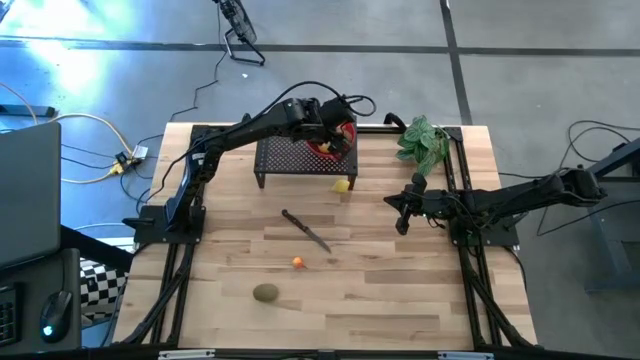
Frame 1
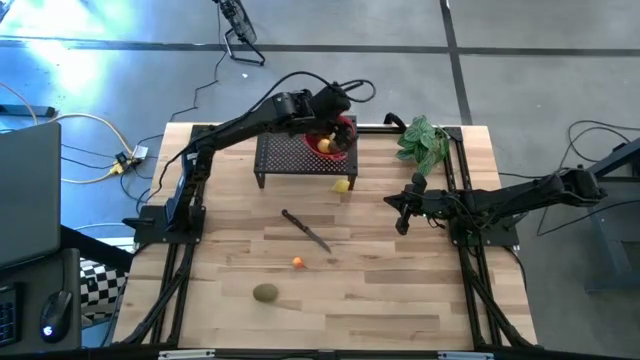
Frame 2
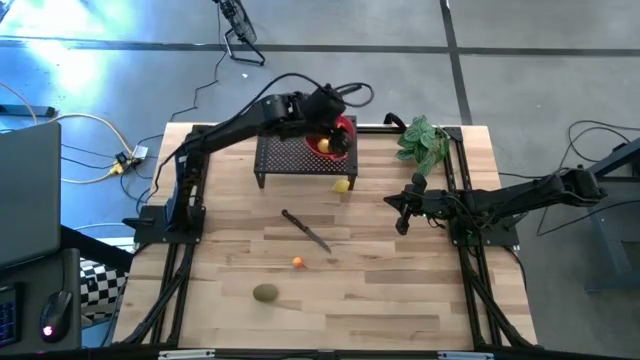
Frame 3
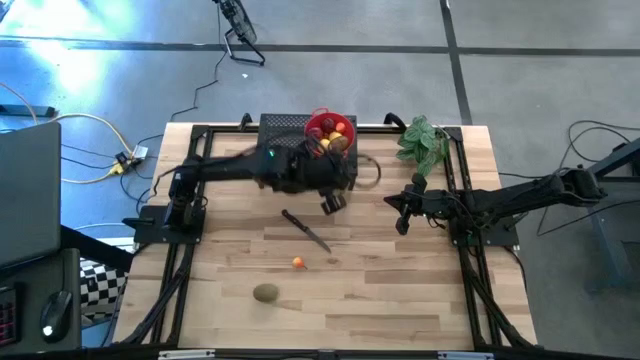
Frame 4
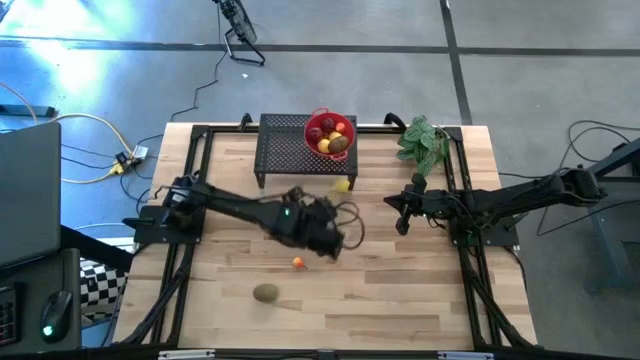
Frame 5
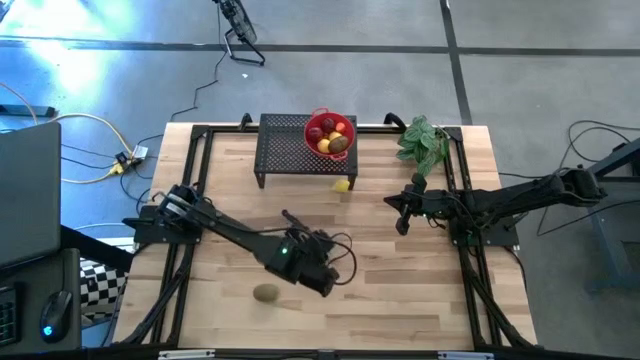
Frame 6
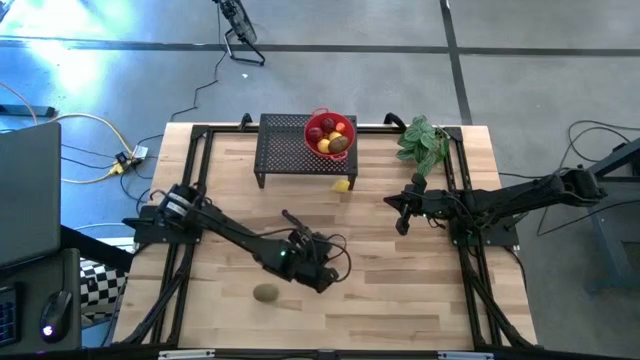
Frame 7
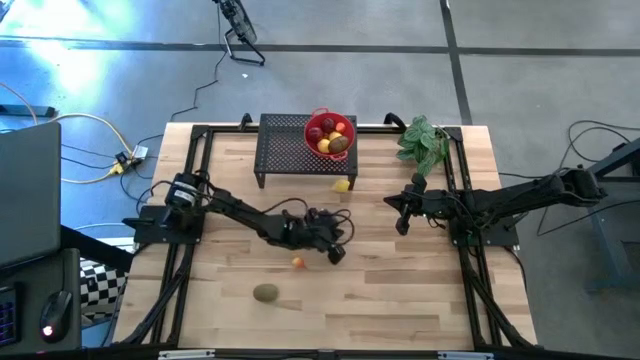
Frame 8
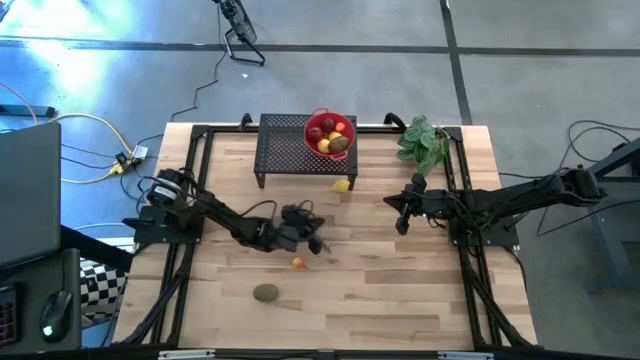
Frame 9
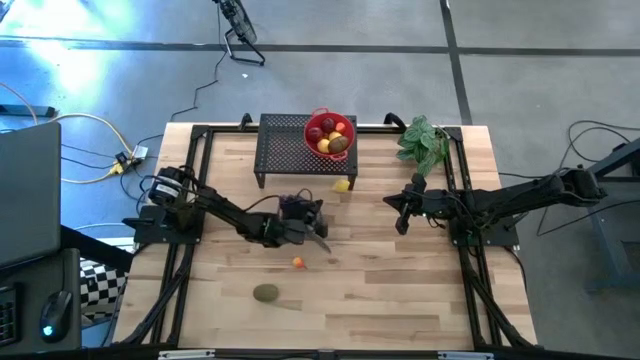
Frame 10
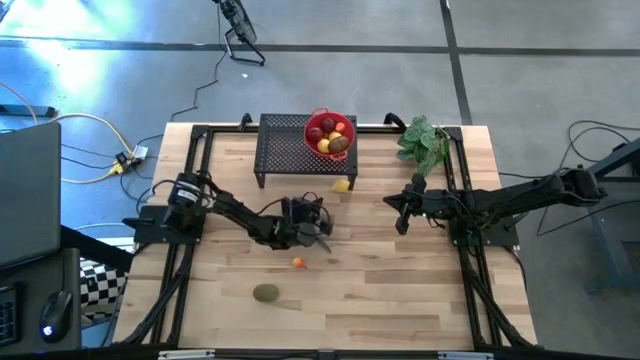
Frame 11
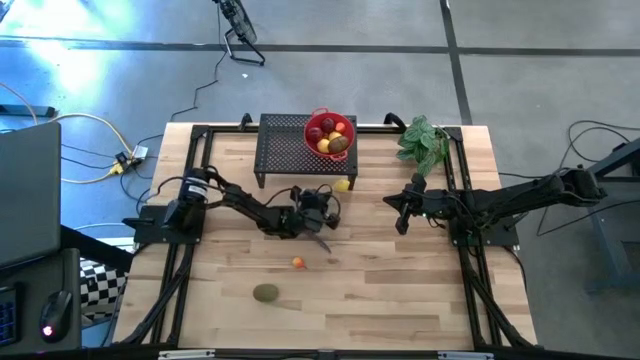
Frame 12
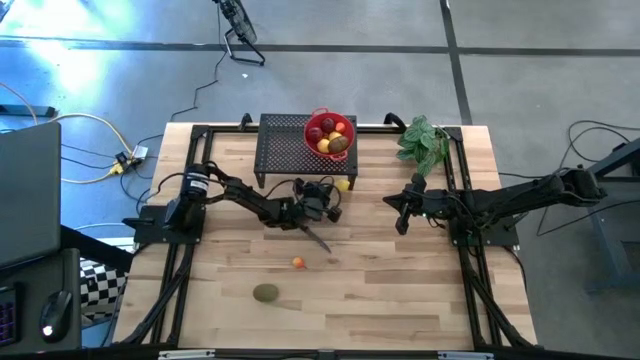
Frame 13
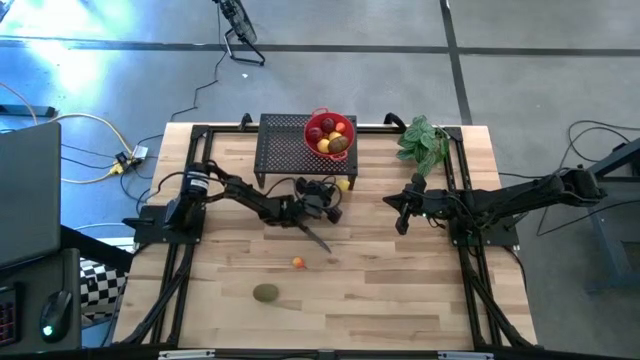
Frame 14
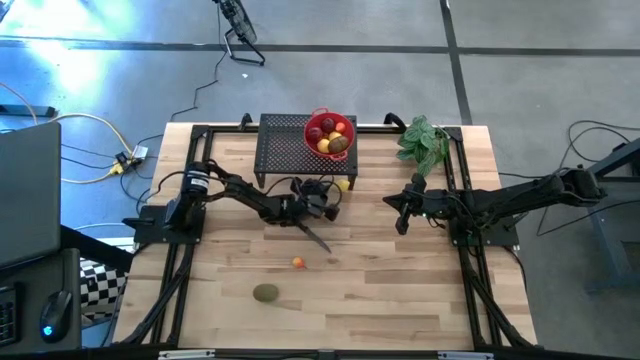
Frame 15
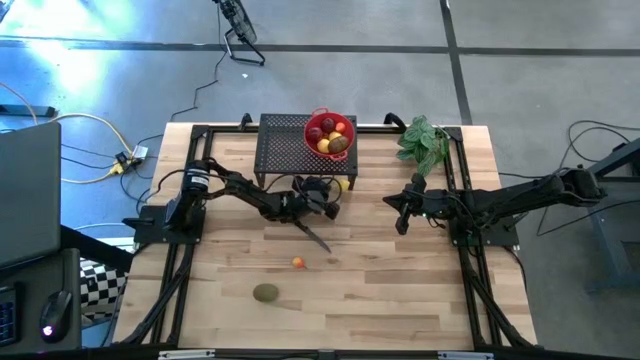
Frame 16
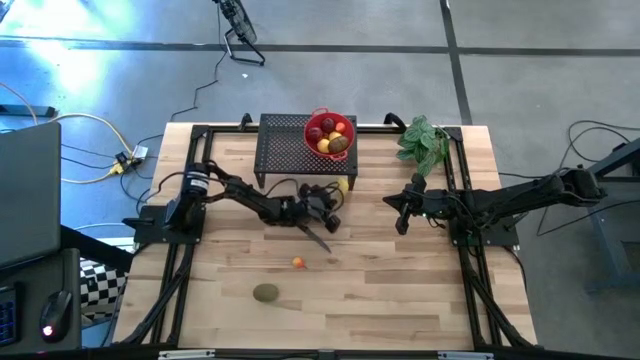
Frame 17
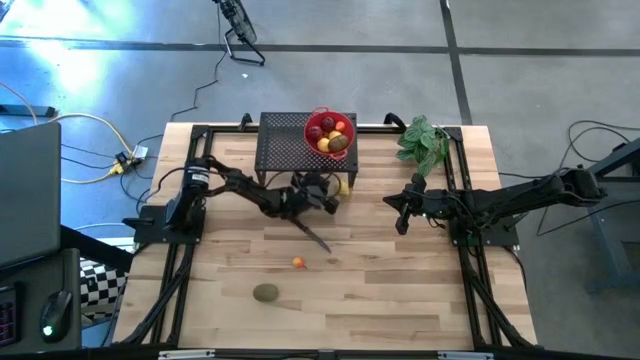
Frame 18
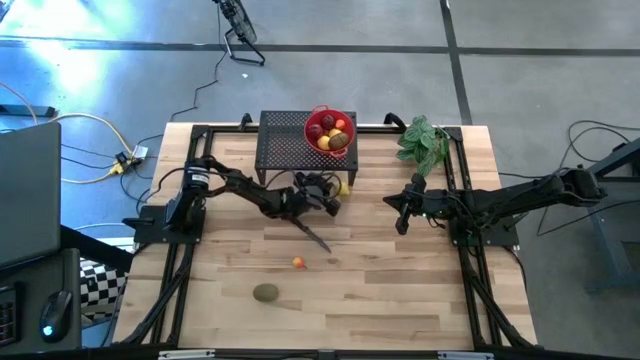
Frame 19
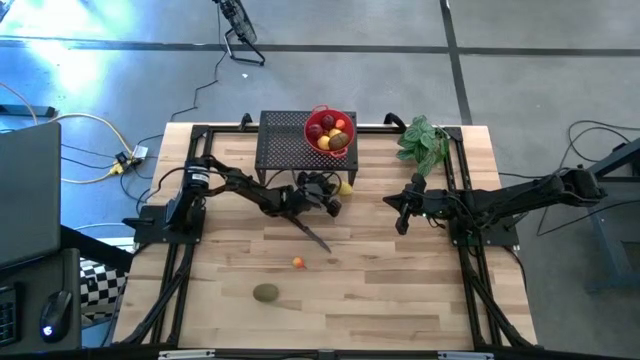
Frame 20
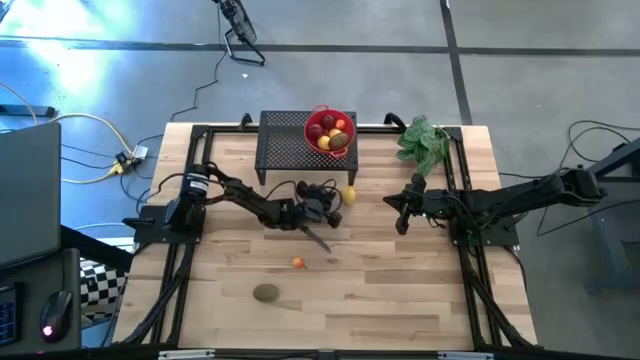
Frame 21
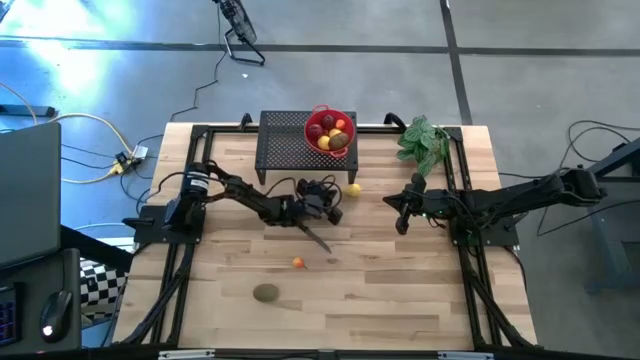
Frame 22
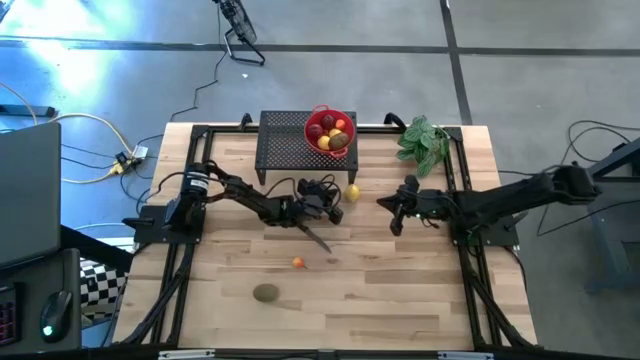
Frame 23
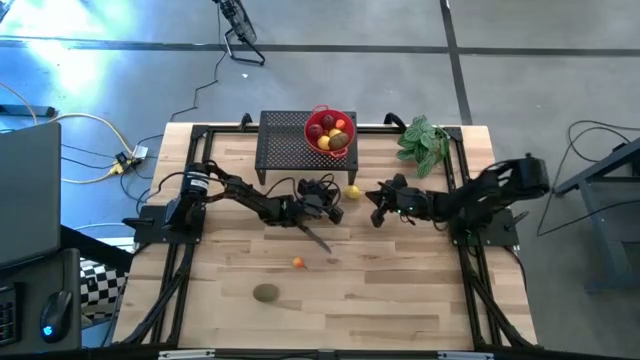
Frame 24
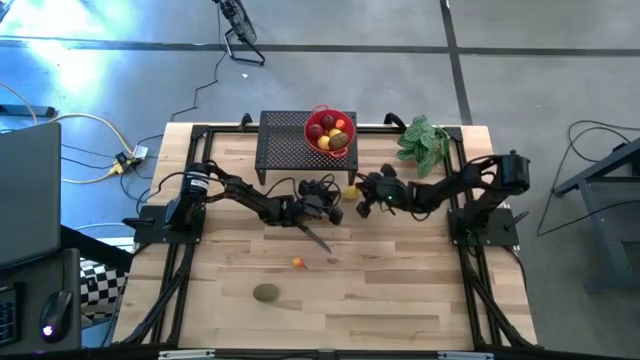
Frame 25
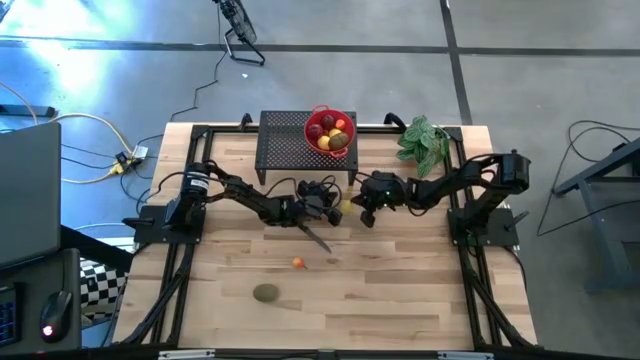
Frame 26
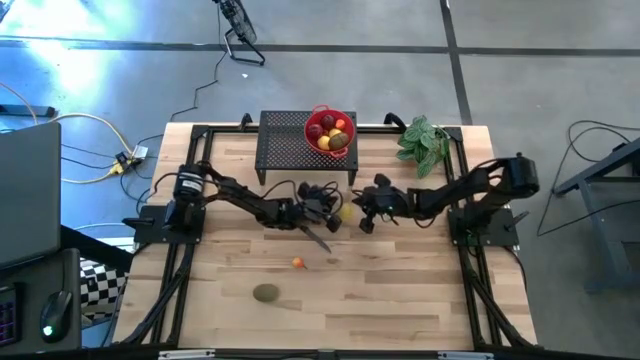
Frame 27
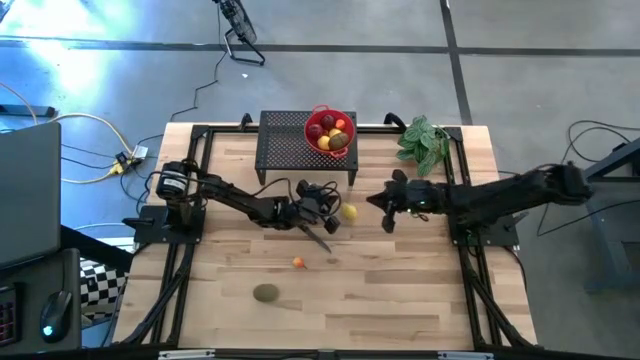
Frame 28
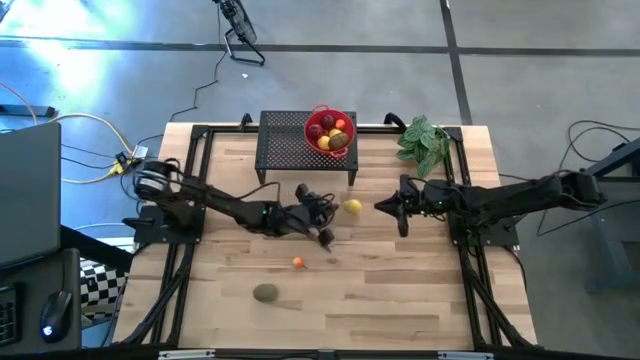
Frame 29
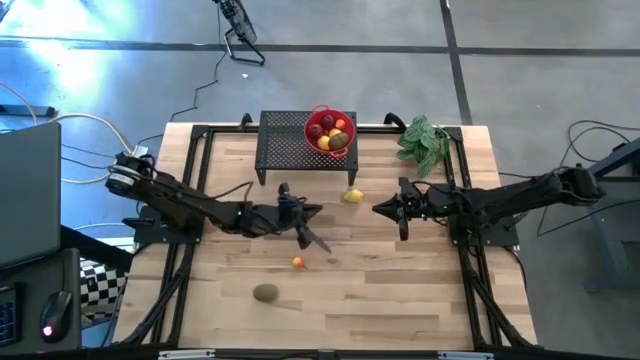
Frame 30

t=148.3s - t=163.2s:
Task: Pick & Place Fruit
Put the lemon into the colander on the shelf

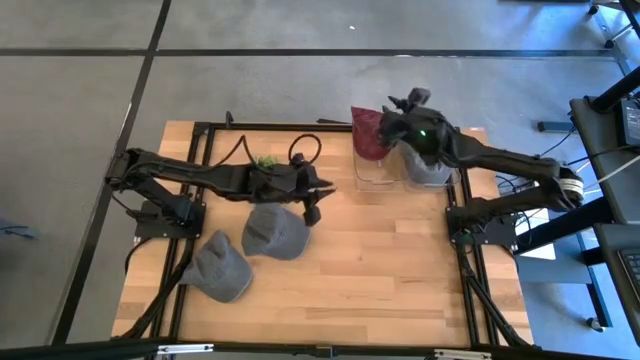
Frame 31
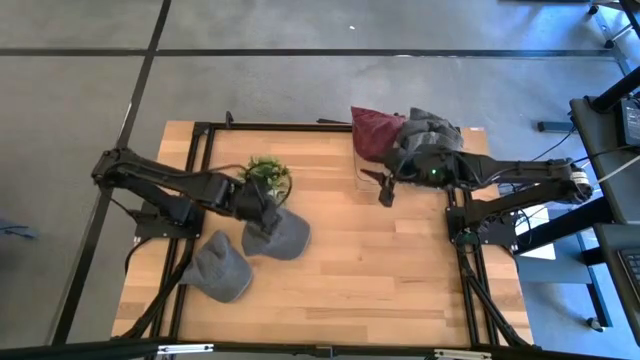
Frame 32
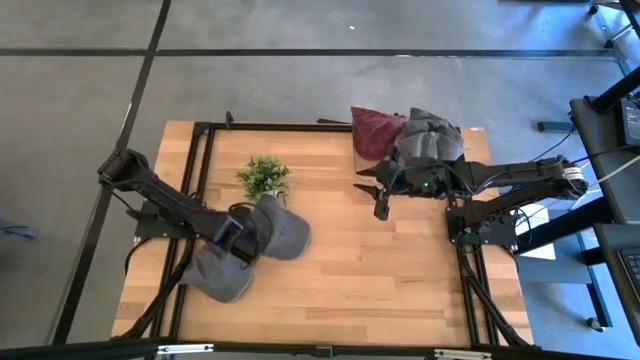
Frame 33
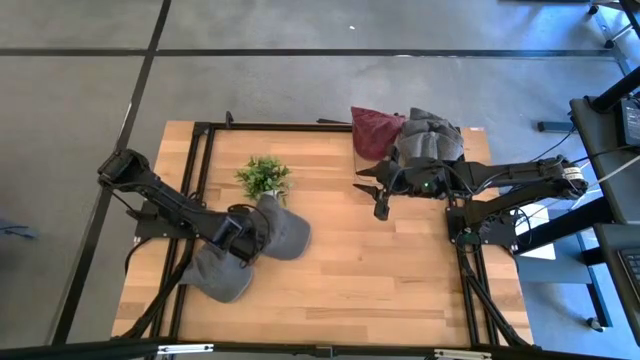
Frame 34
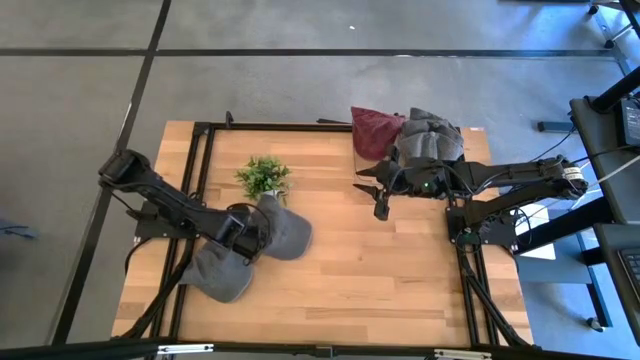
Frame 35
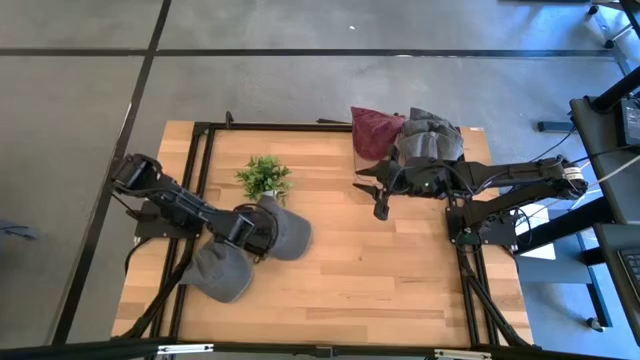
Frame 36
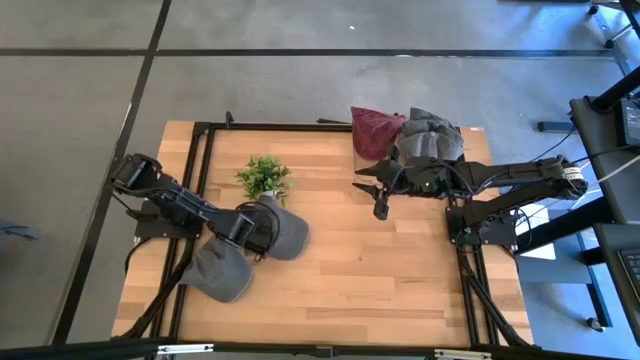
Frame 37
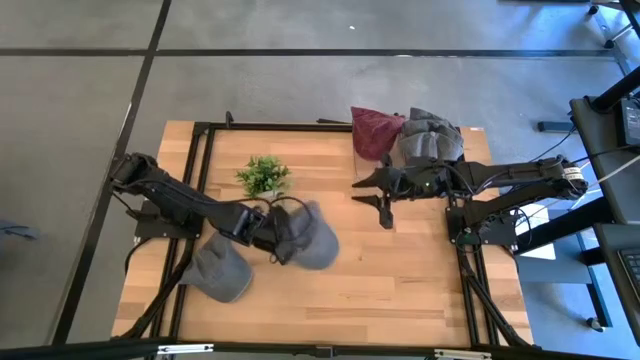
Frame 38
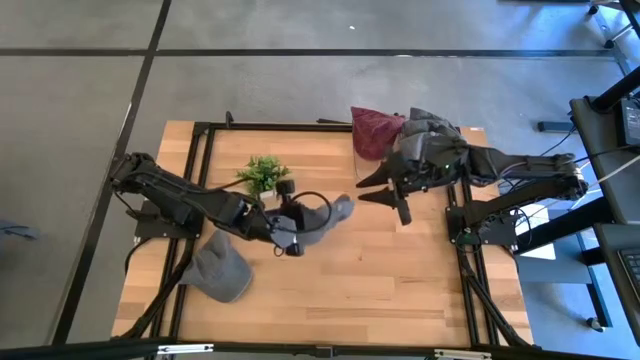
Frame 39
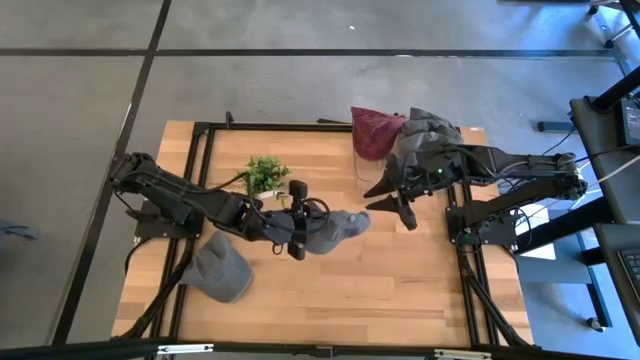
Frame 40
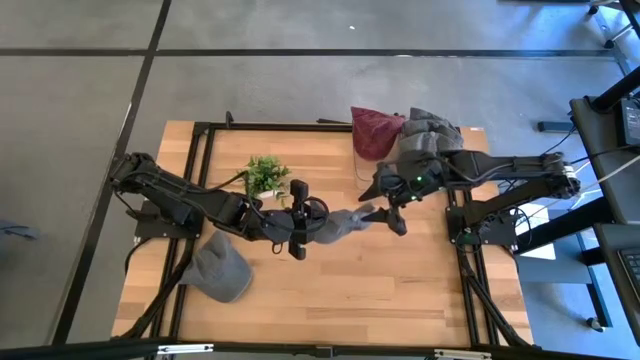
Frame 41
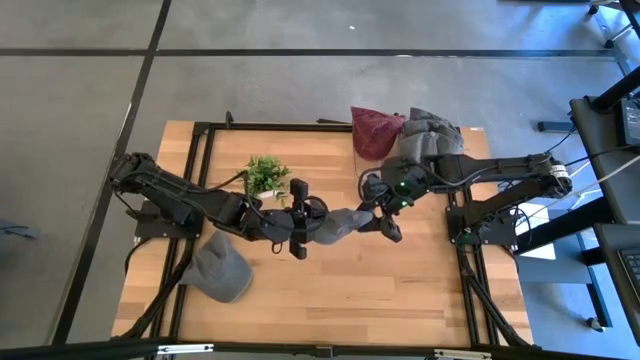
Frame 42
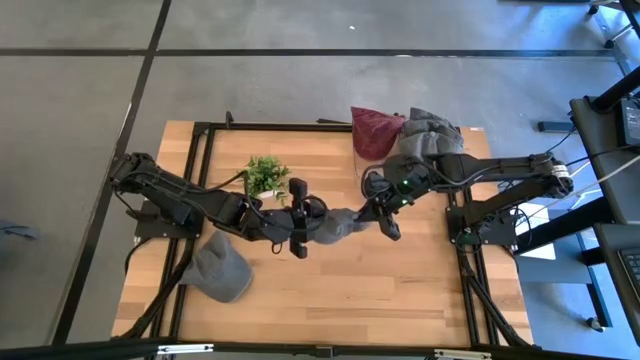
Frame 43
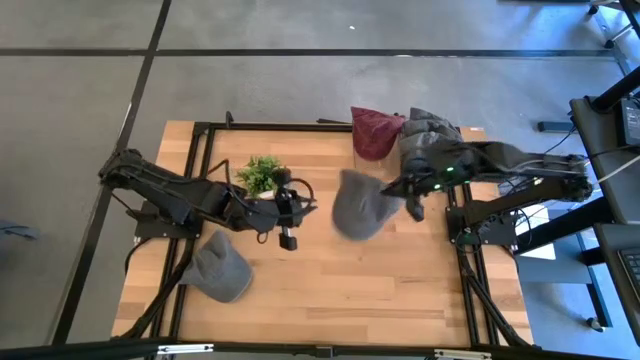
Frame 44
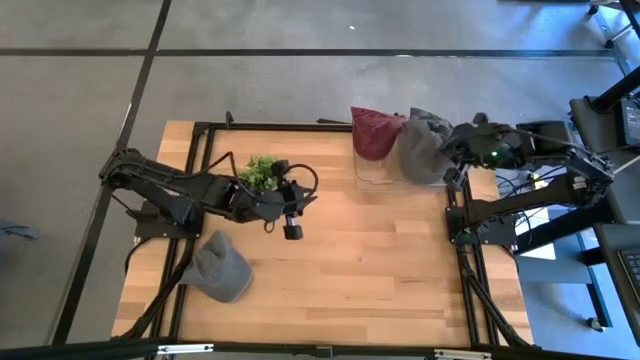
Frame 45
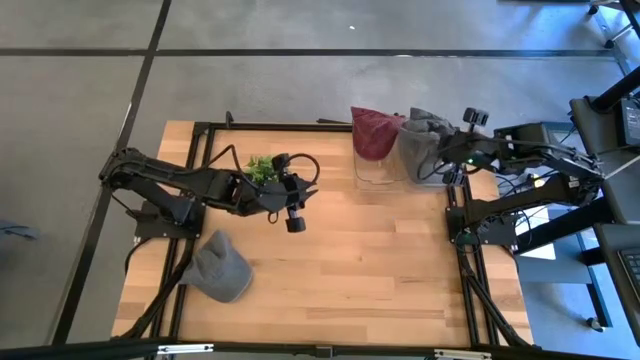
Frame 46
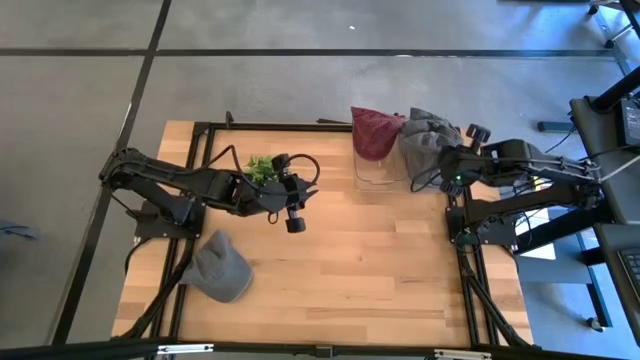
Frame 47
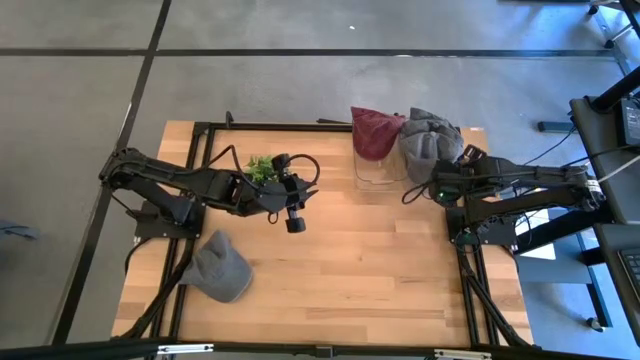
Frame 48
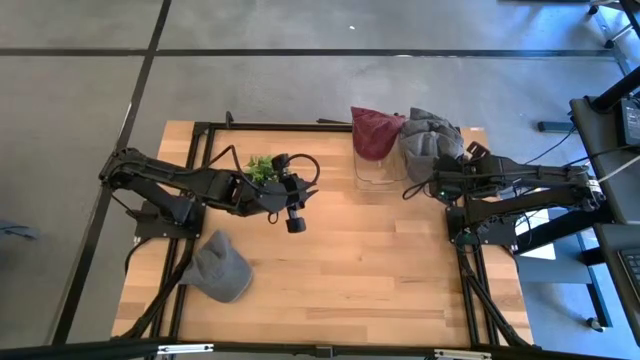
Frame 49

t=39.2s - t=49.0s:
Task: Pick & Place hat
Put the gray cap into the right transparent bin
